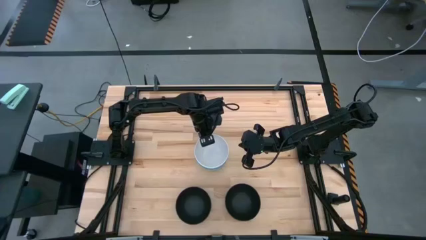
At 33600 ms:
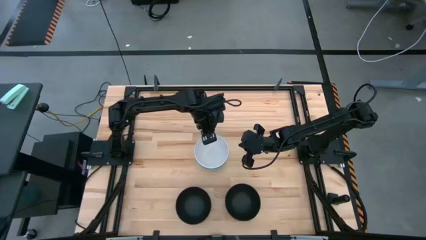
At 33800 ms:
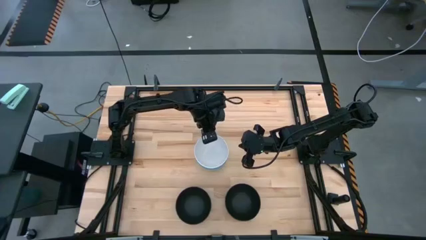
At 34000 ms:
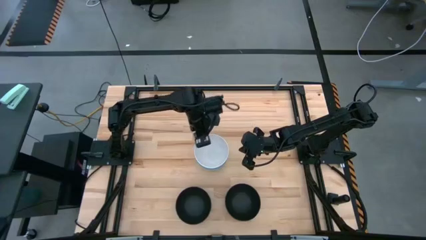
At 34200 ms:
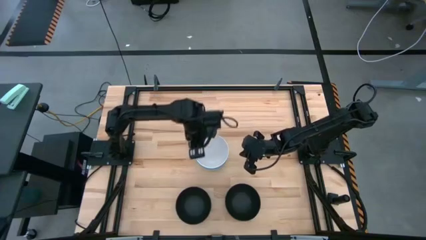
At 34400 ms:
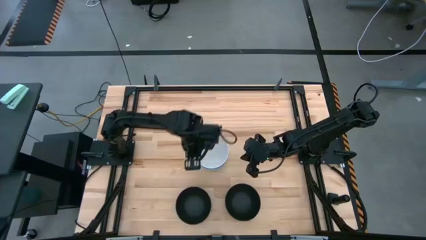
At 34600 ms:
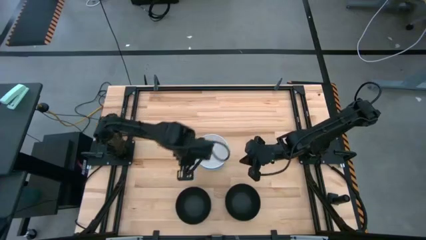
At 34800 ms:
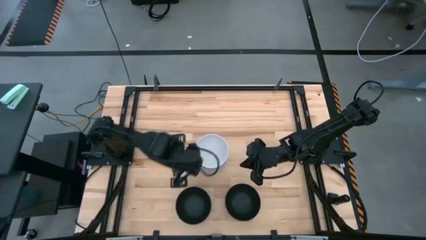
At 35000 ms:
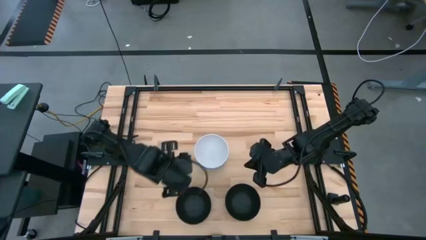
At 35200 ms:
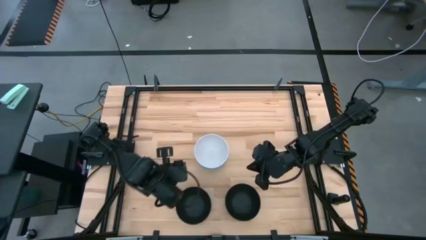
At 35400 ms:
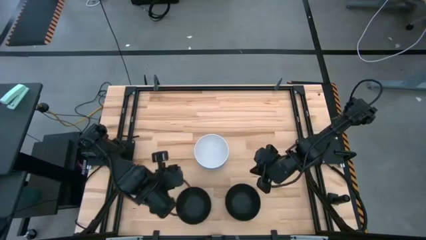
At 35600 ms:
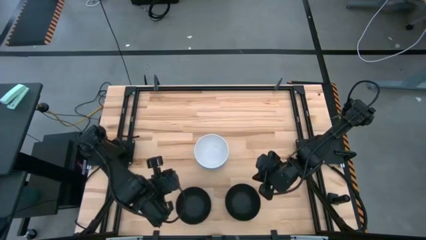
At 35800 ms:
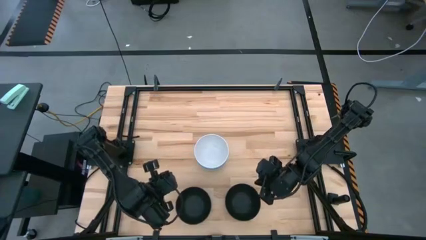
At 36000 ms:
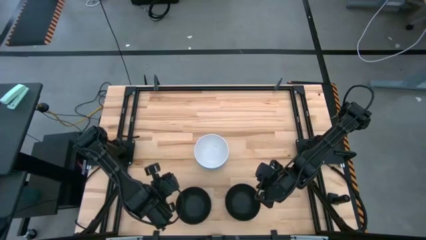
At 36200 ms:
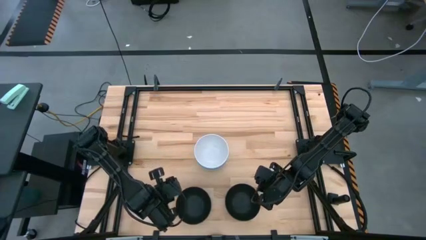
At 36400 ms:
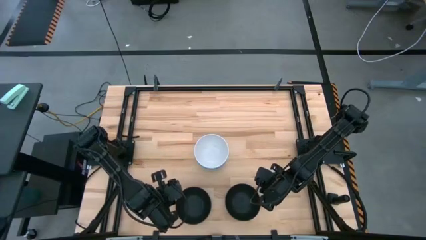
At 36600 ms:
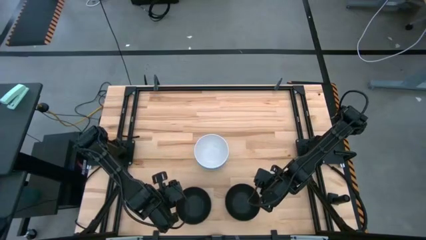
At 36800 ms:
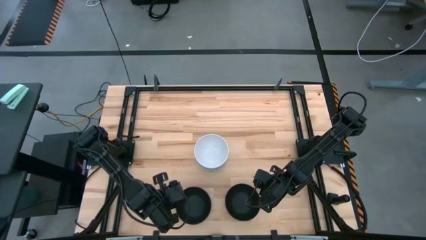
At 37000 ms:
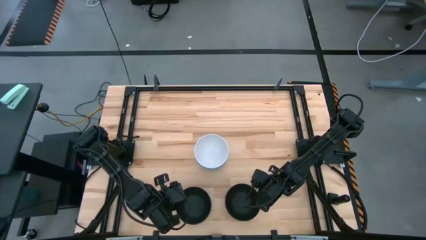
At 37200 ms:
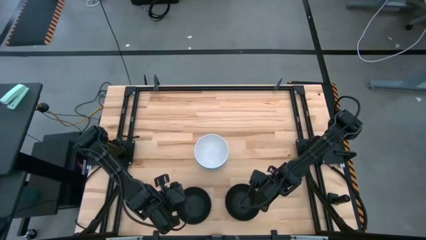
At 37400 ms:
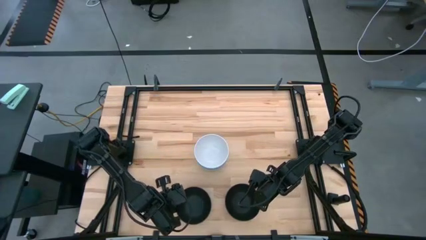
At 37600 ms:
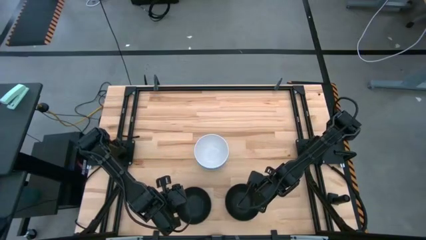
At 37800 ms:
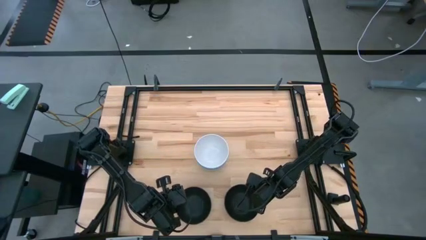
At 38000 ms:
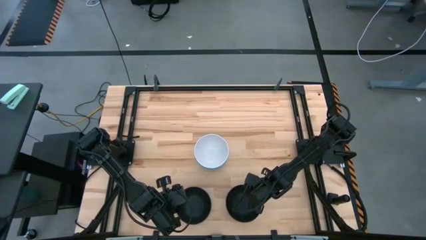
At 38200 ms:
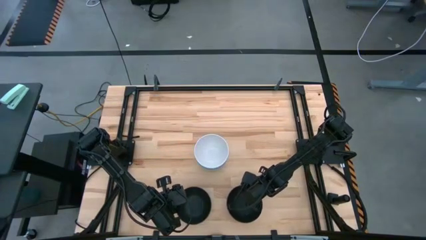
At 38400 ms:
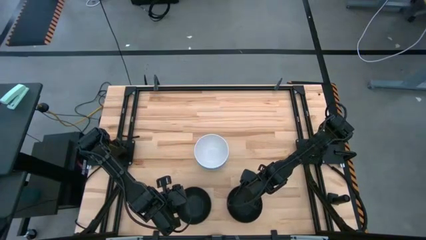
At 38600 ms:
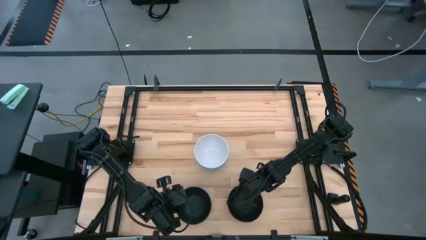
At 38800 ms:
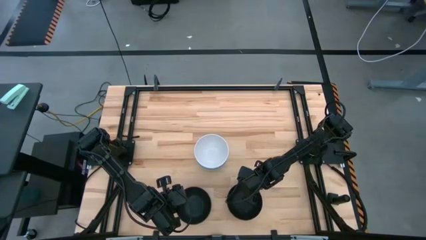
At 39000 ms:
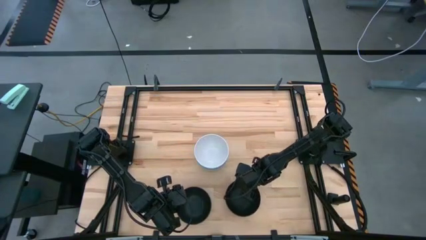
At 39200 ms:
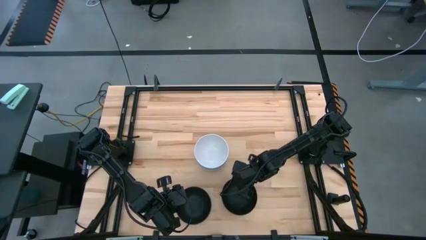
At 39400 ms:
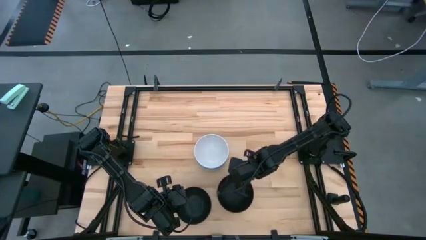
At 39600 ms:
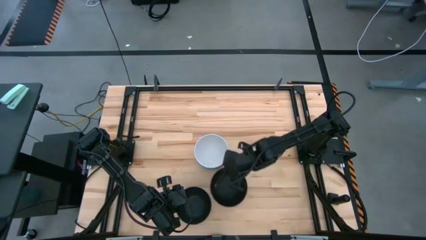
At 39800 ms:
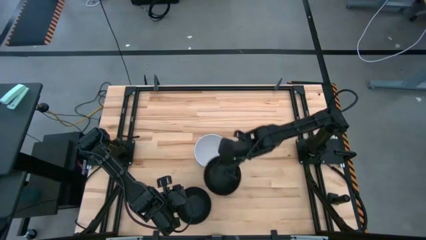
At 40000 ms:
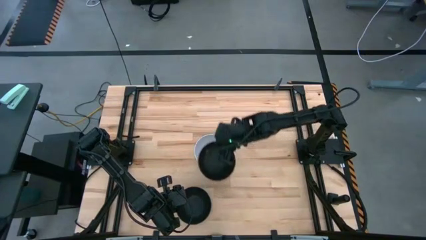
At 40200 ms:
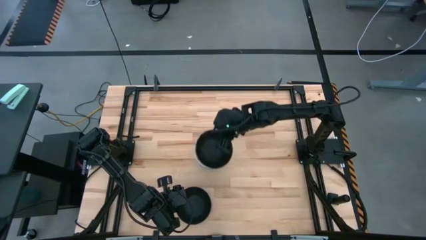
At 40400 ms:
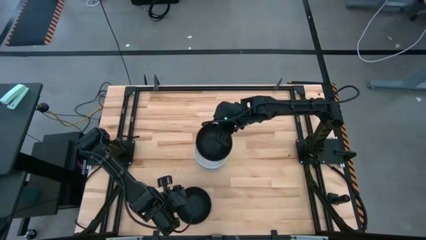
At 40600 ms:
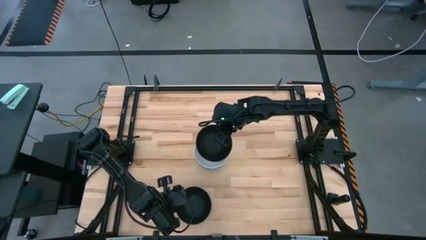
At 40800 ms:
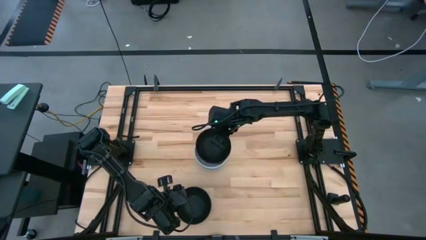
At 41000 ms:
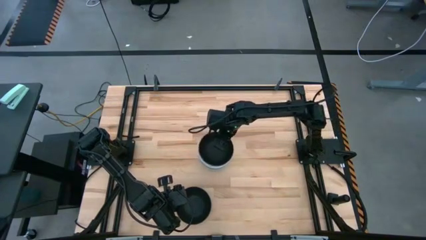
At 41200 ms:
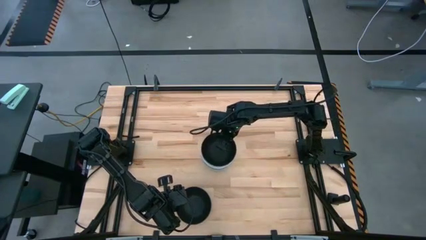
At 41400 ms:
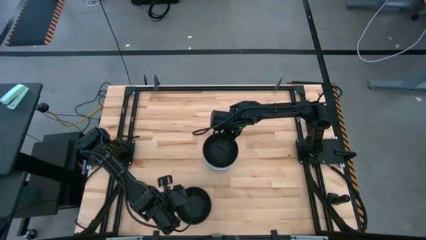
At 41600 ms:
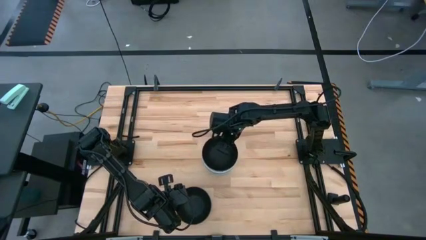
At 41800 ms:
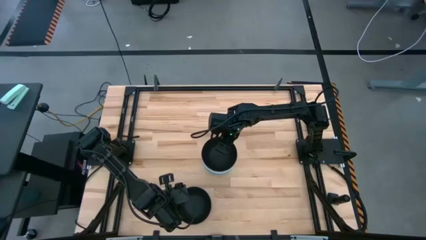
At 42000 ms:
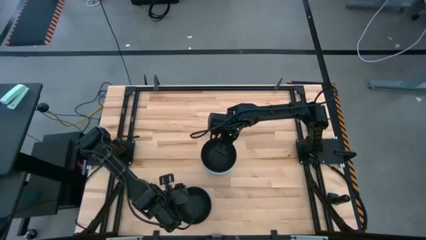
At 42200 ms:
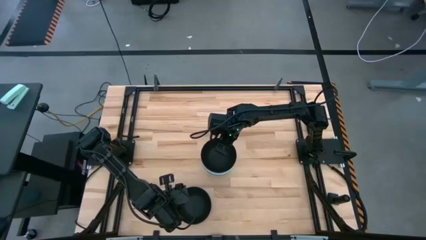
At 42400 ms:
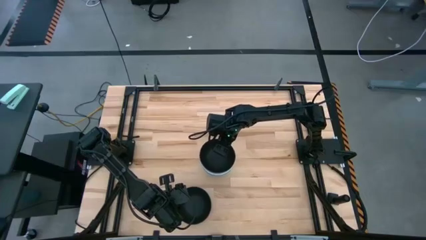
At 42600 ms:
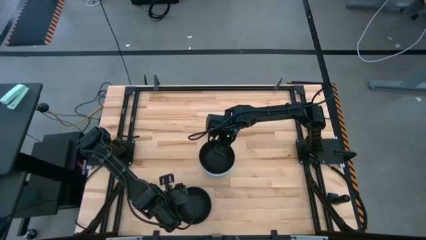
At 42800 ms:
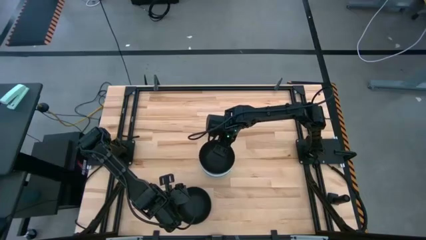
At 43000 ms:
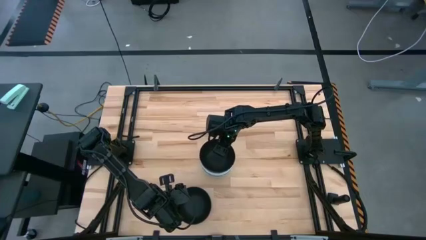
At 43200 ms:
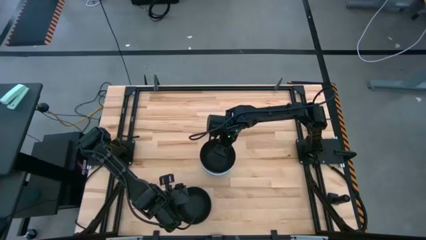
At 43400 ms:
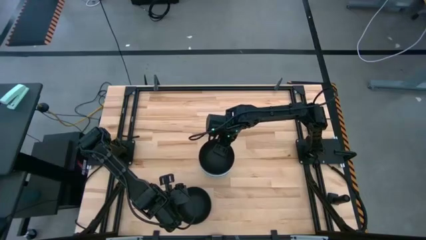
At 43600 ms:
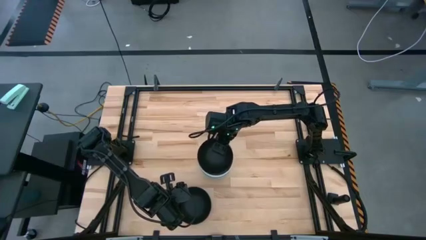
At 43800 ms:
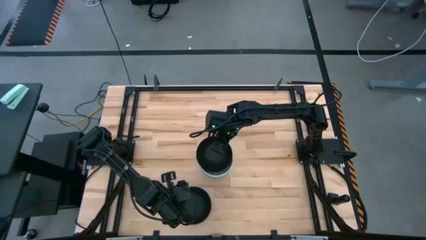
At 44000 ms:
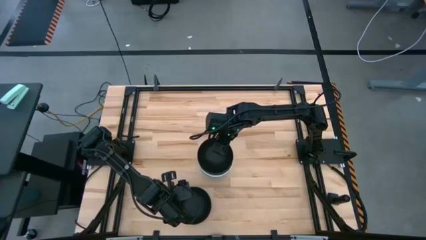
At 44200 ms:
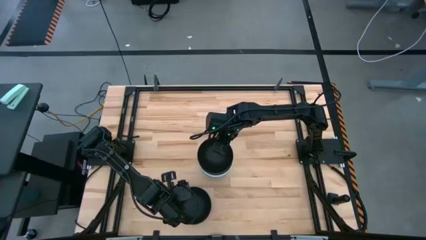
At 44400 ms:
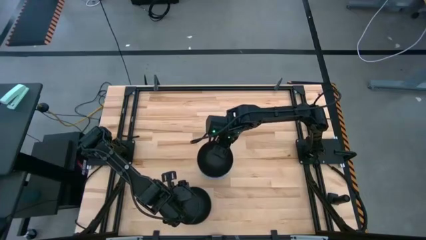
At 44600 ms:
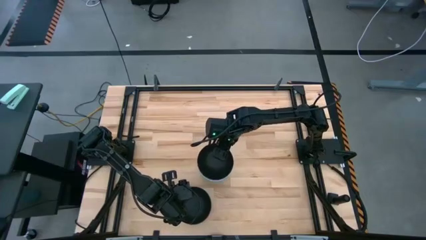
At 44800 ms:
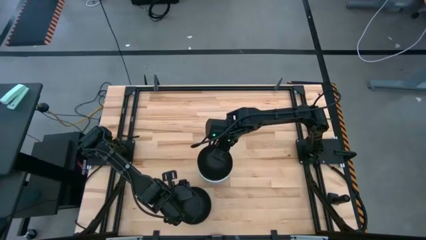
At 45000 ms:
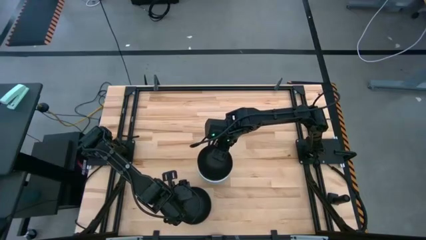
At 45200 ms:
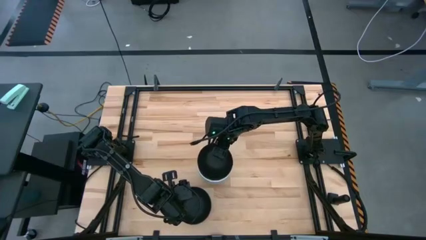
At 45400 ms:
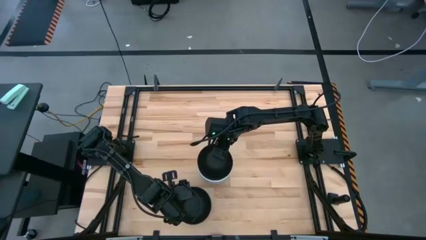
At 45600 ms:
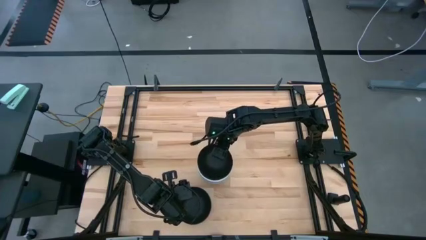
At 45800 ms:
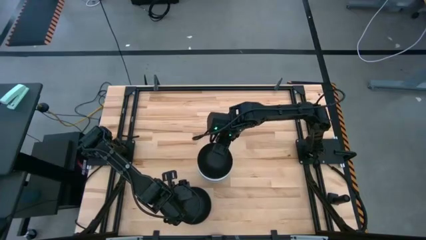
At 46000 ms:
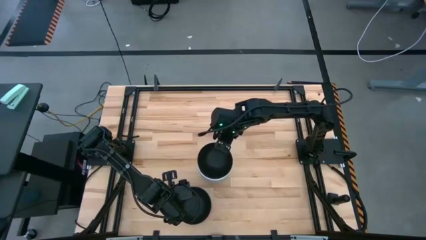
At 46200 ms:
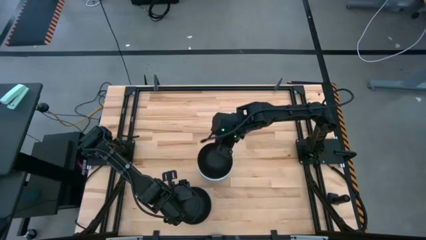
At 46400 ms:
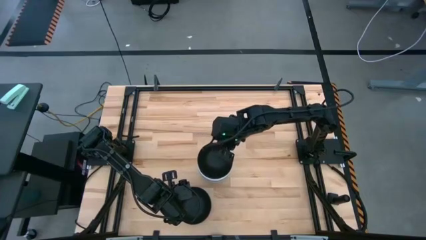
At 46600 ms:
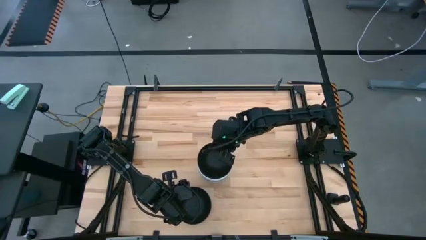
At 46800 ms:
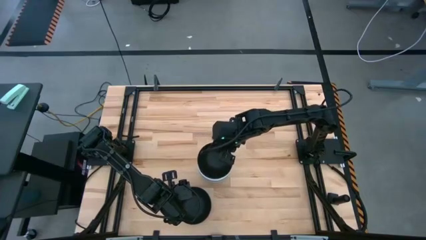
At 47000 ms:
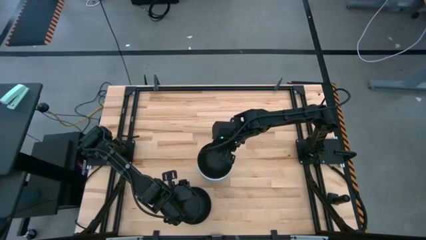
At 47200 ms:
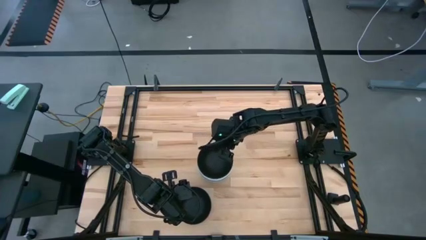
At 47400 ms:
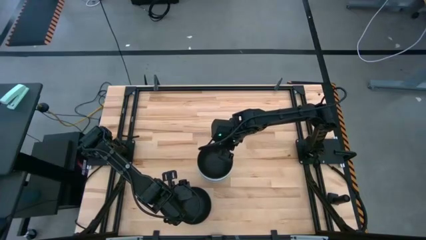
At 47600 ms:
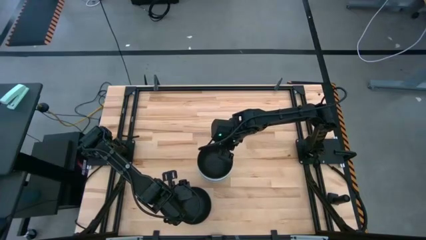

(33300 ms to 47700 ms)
Task: Nest bowls inside each other
Stack the right black bowl on the white bowl
